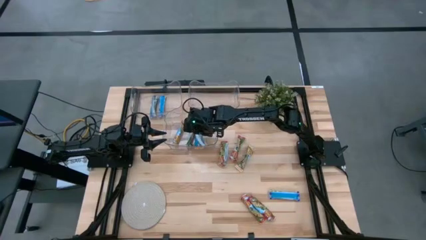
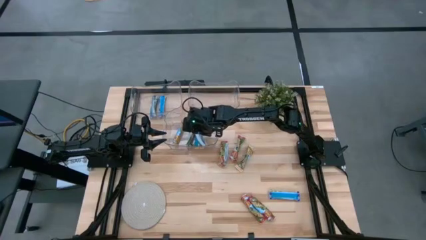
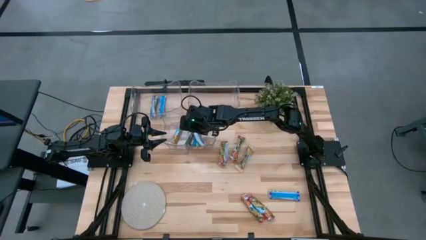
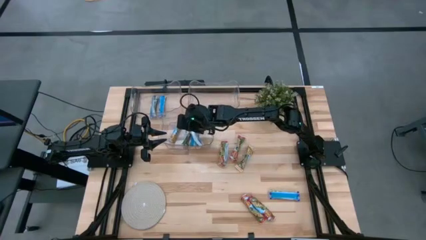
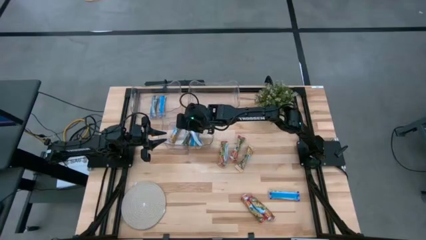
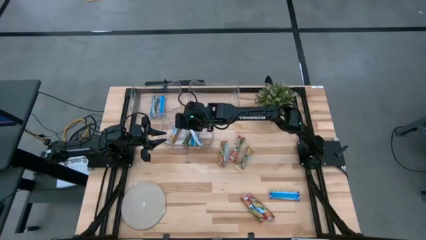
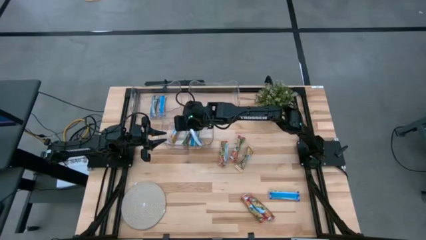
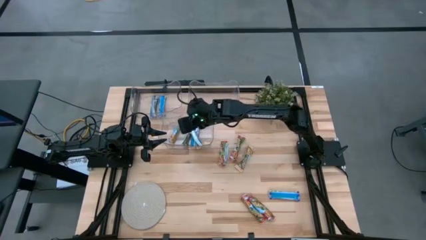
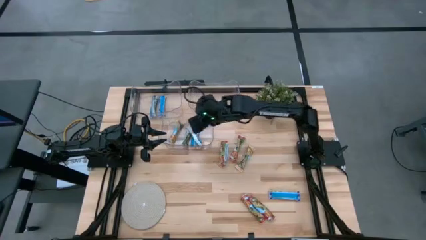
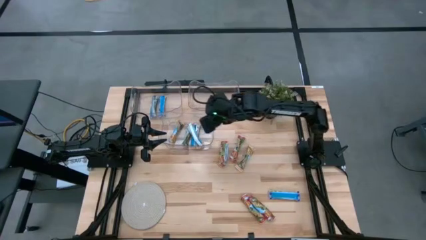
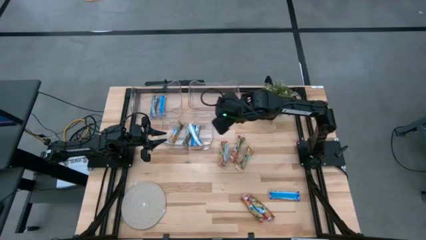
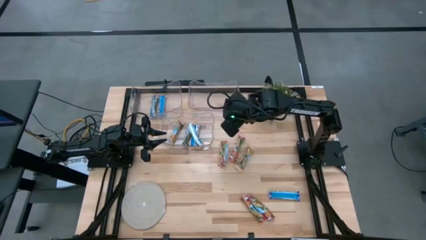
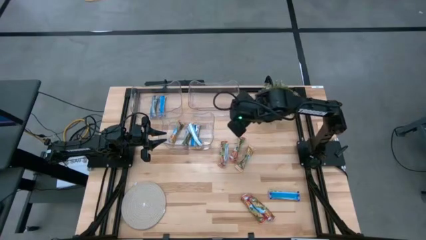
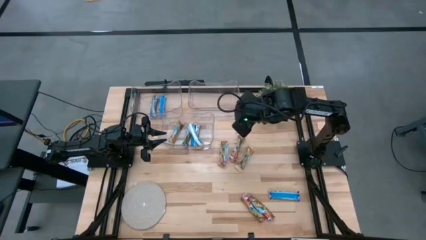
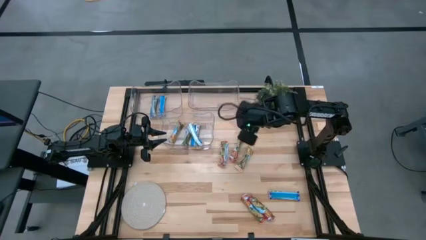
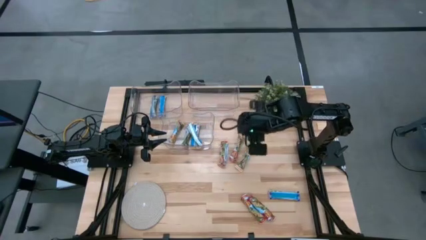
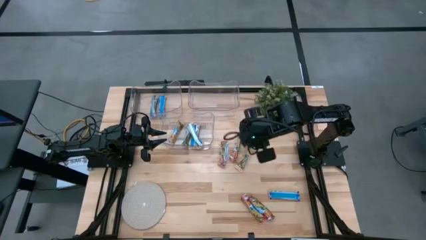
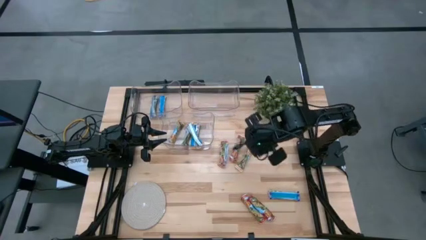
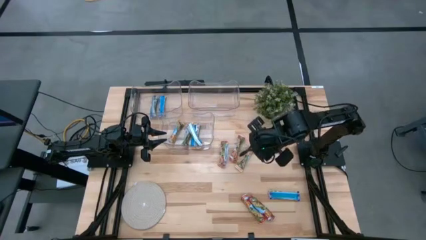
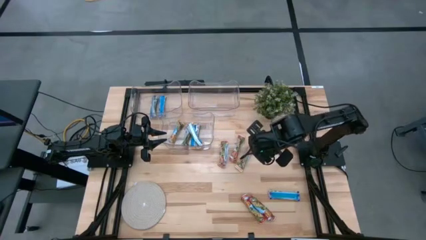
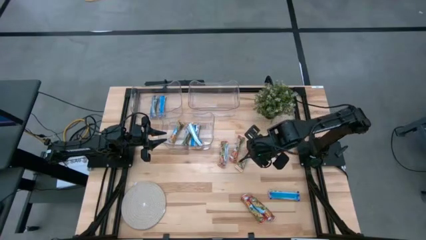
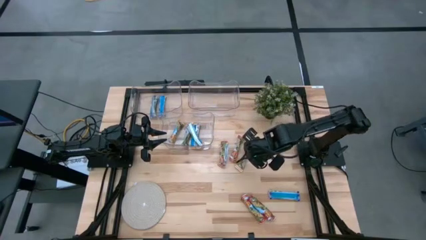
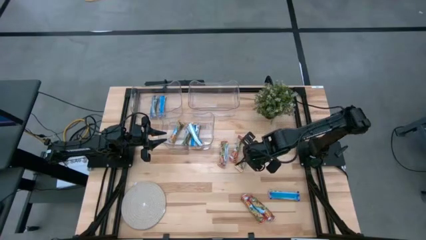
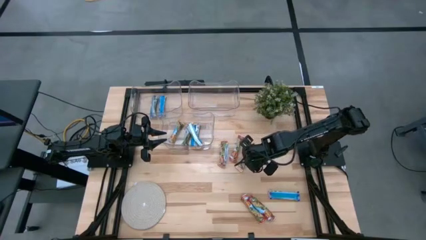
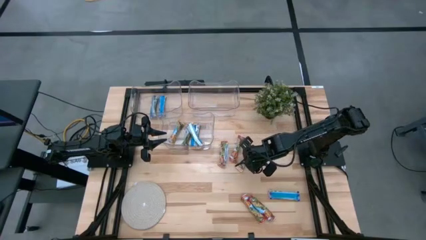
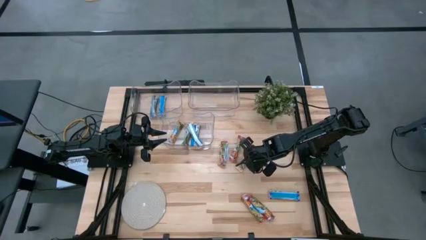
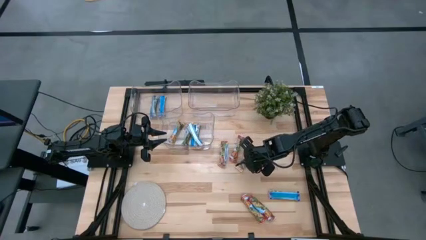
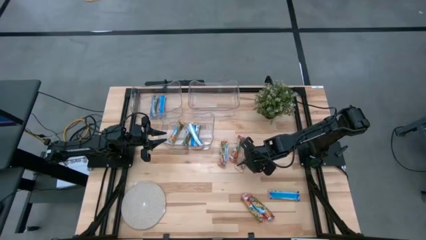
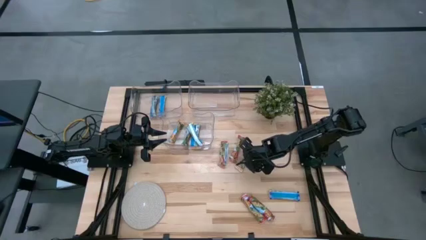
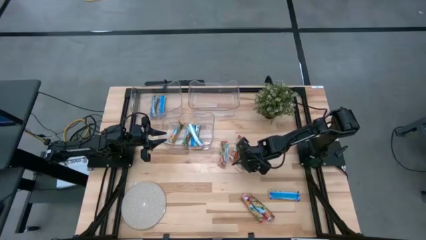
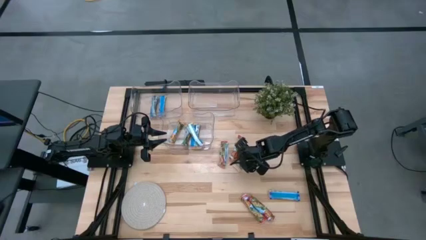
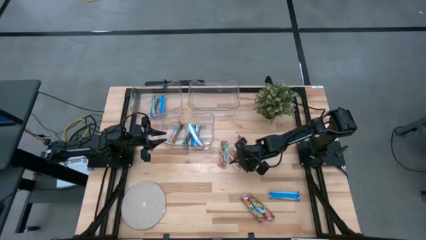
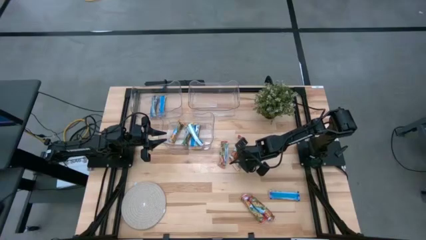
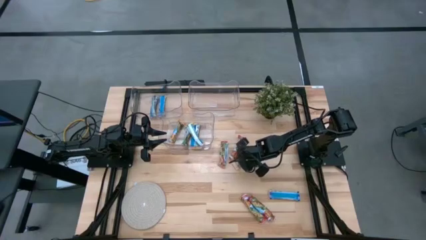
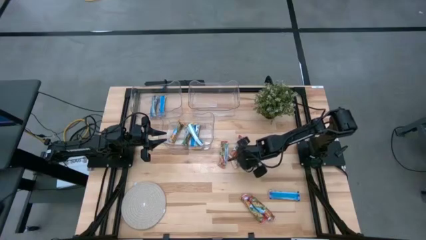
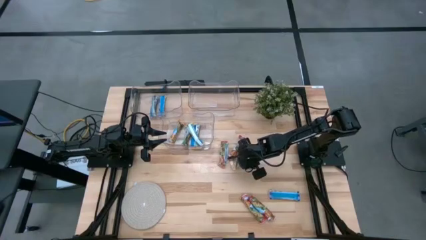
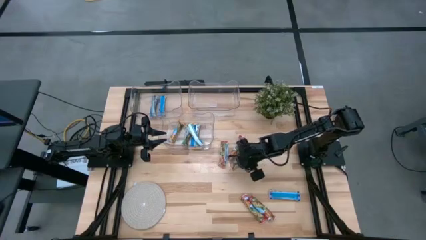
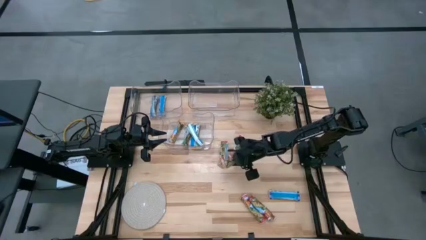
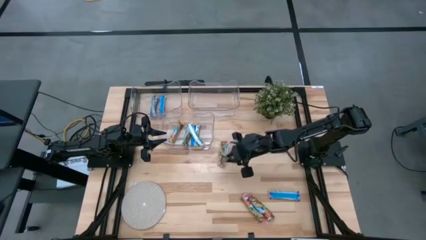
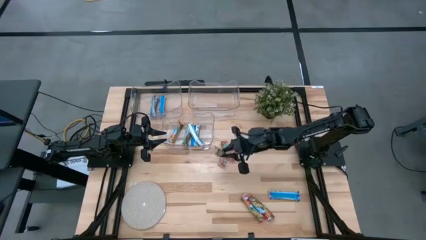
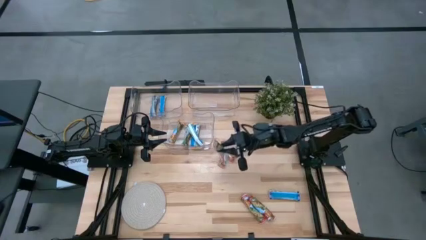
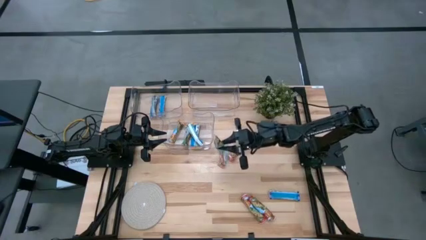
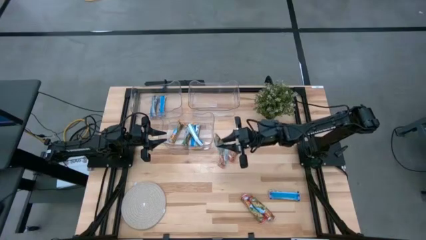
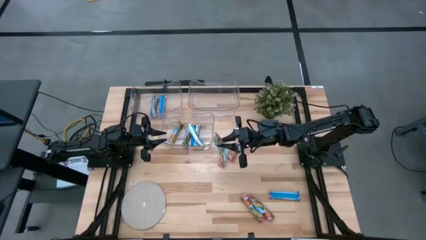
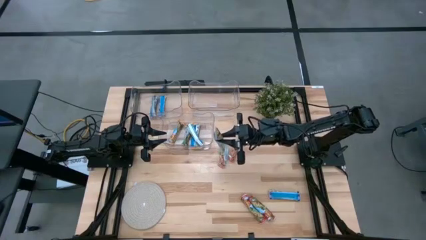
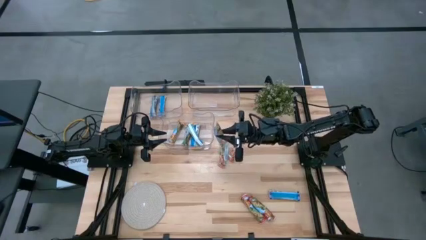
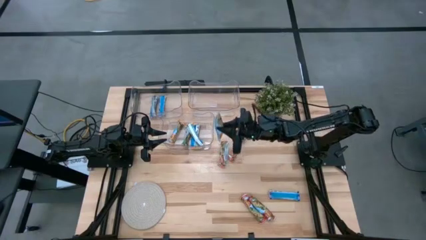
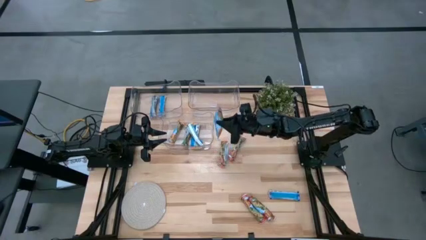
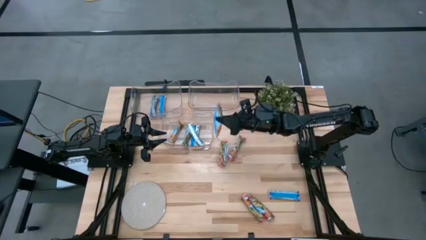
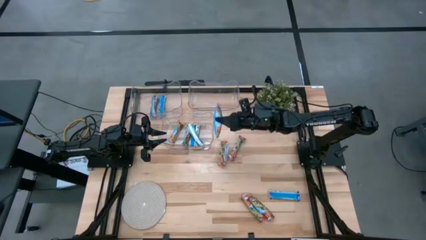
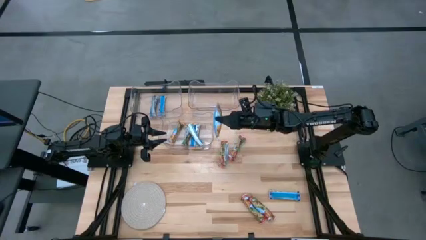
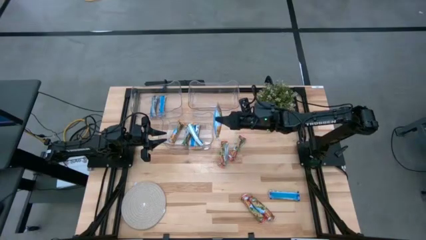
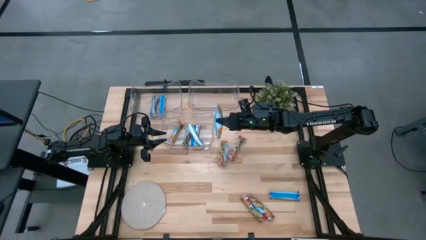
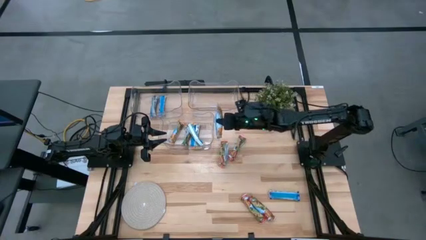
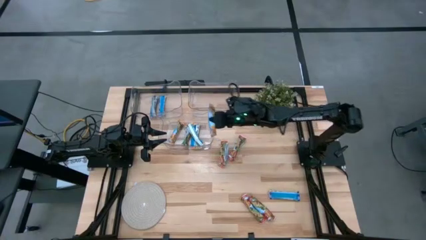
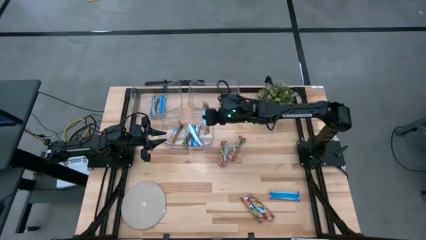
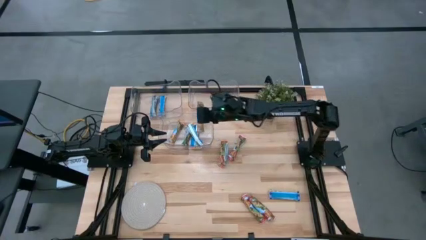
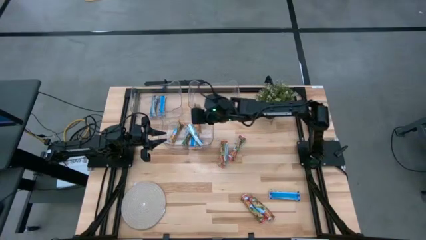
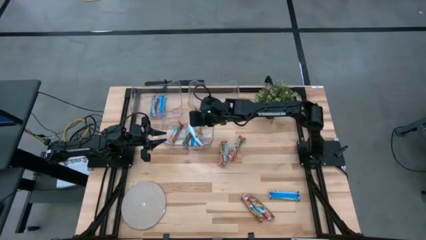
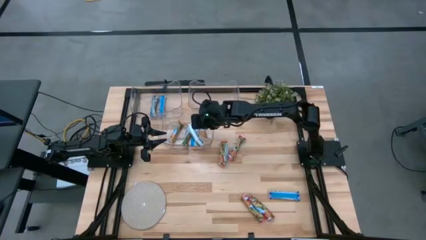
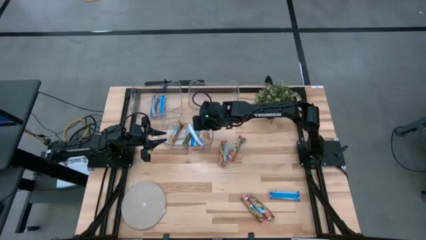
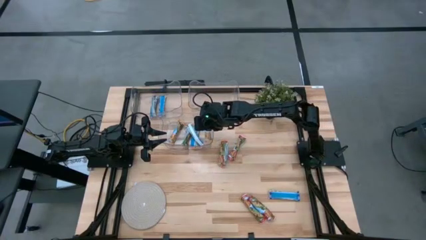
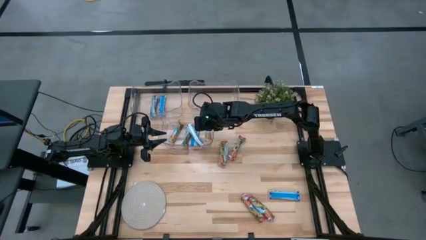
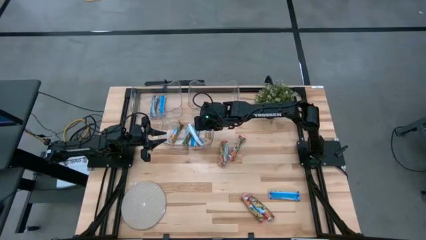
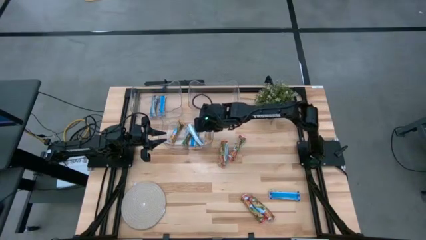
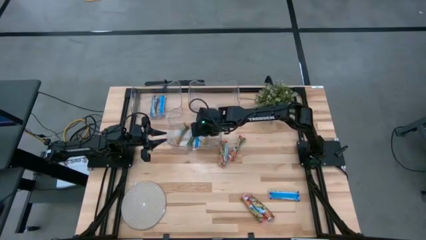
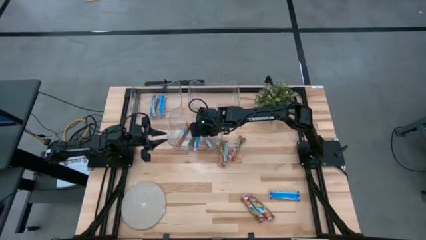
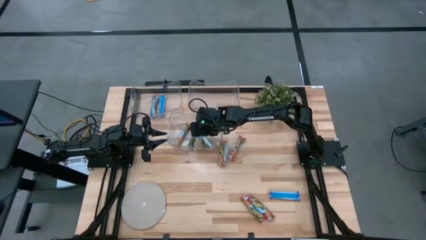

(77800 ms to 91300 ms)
Task: Pick and place Granola Bars by type
Put the orange granola bar into the bottom transparent bin
